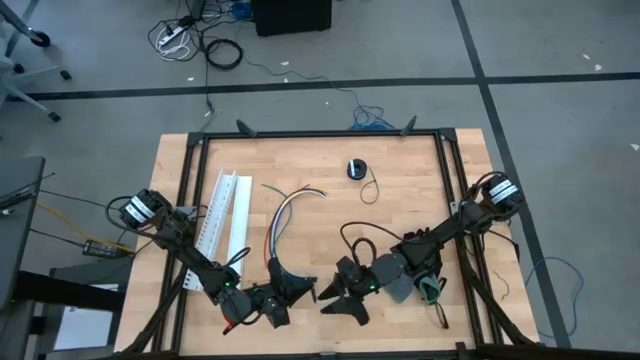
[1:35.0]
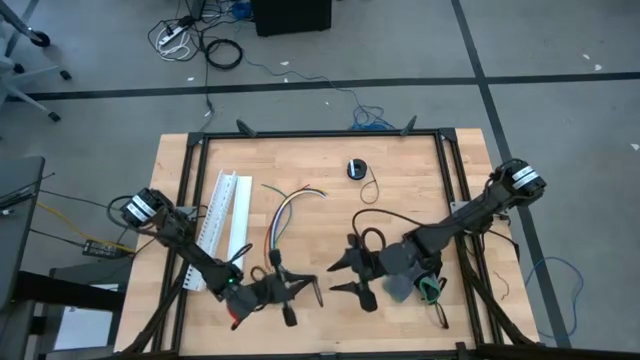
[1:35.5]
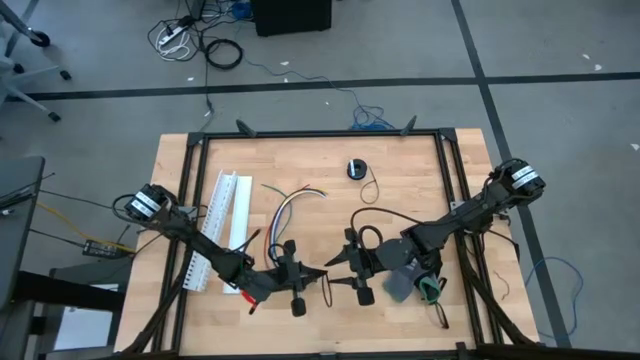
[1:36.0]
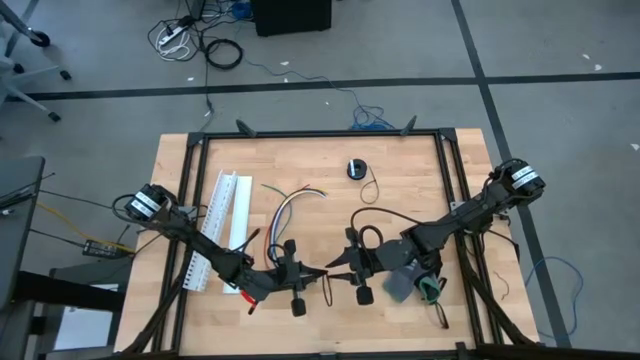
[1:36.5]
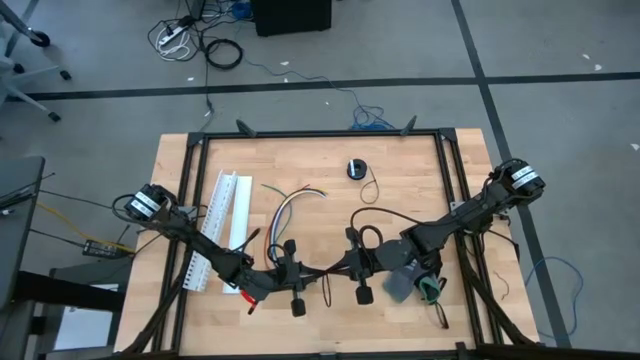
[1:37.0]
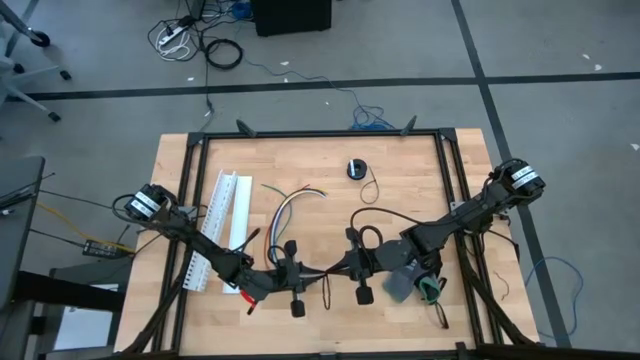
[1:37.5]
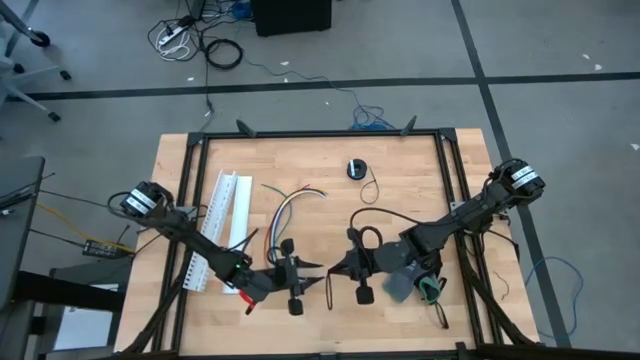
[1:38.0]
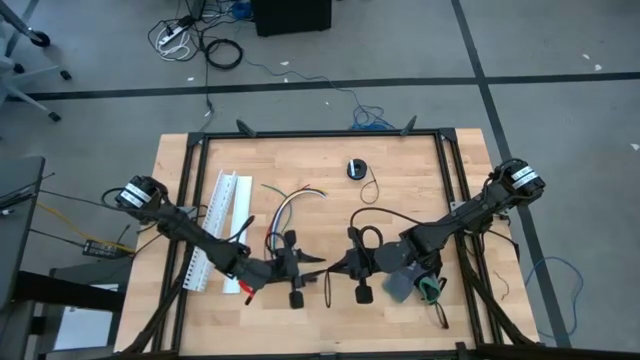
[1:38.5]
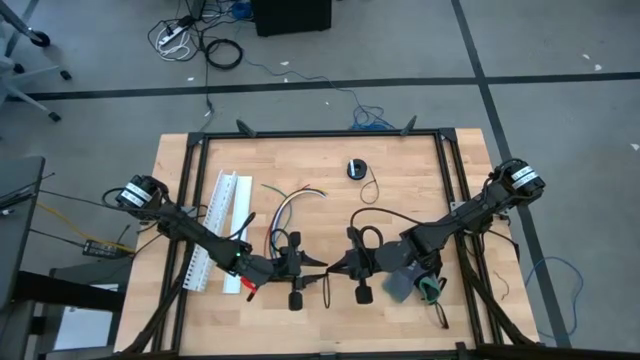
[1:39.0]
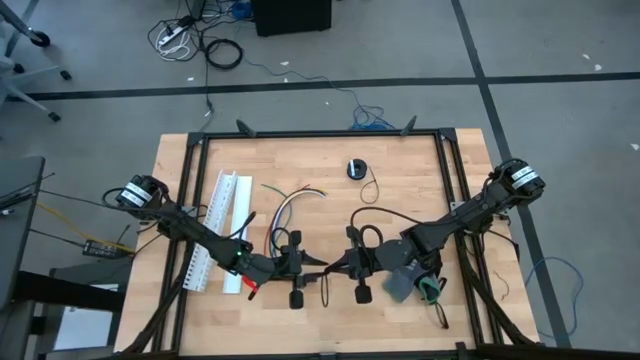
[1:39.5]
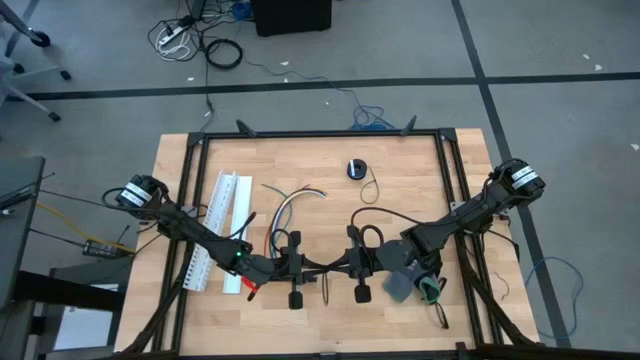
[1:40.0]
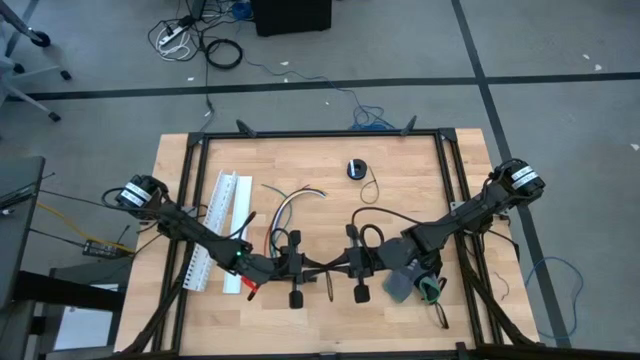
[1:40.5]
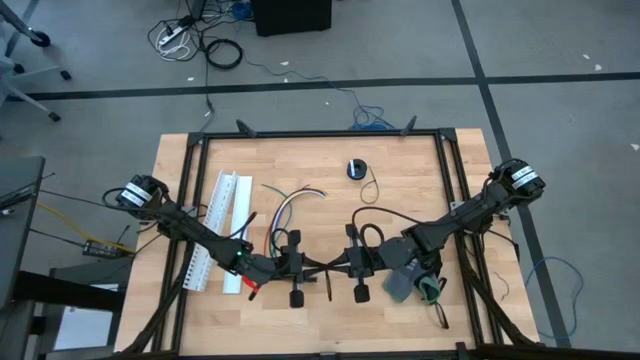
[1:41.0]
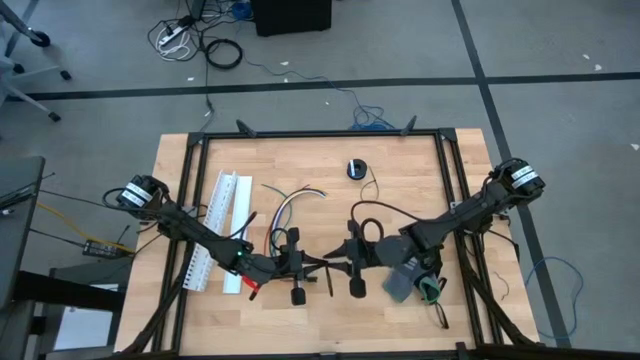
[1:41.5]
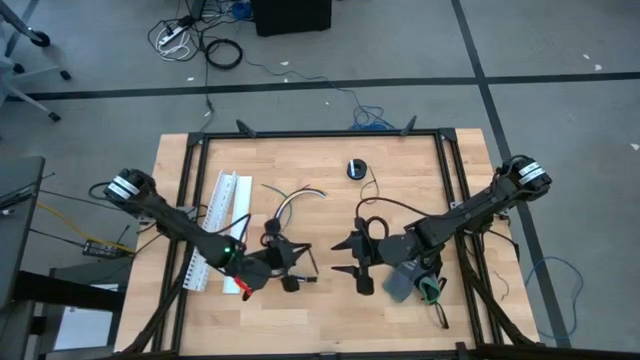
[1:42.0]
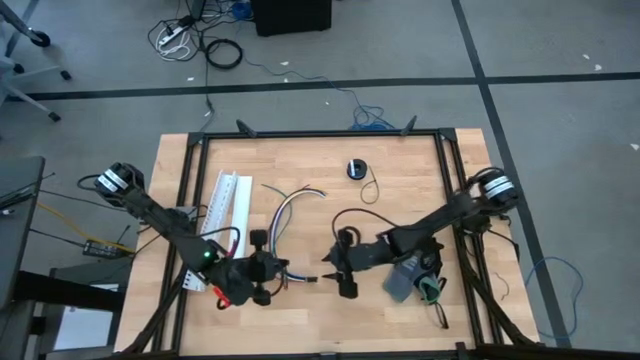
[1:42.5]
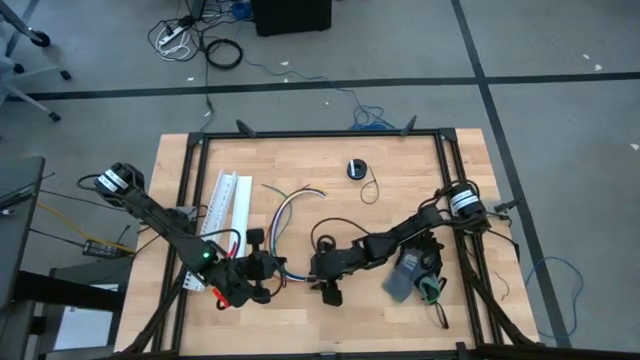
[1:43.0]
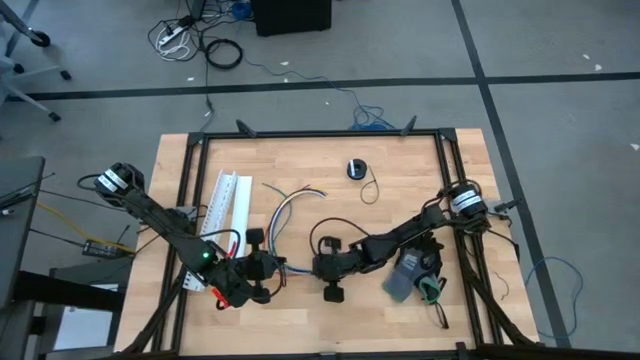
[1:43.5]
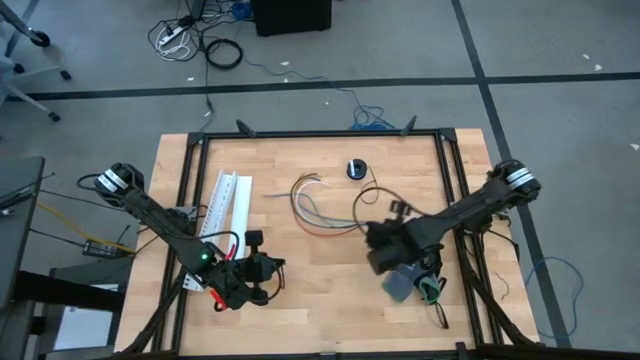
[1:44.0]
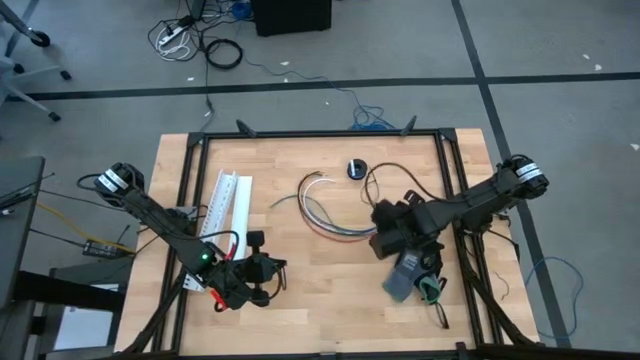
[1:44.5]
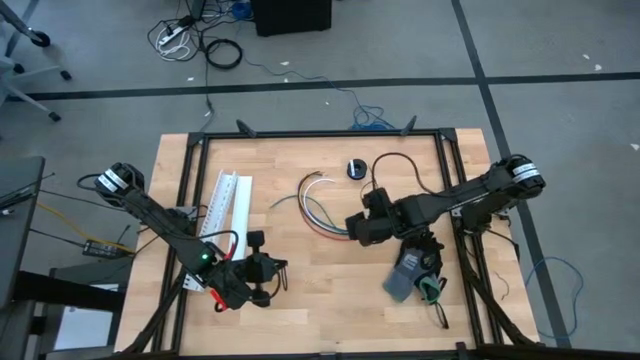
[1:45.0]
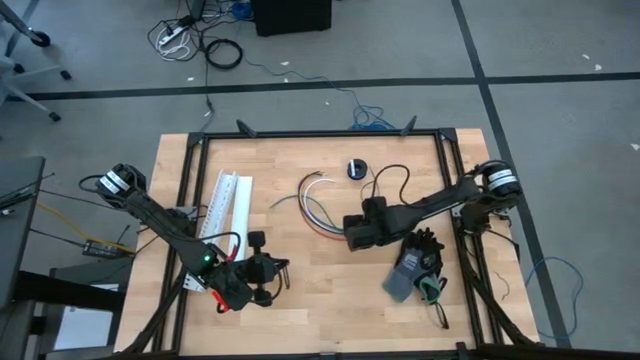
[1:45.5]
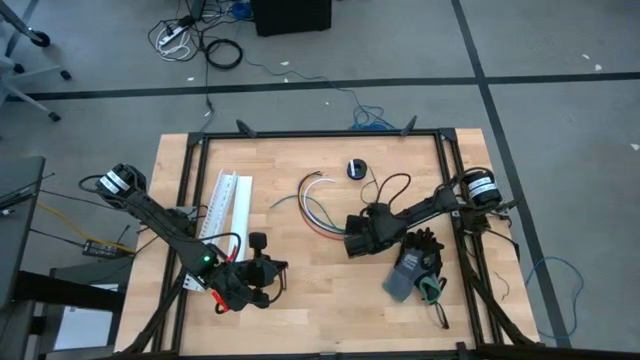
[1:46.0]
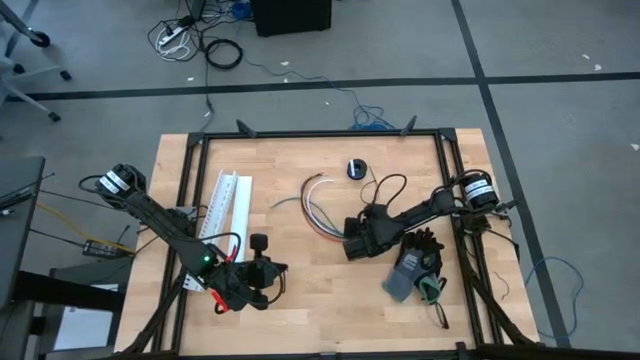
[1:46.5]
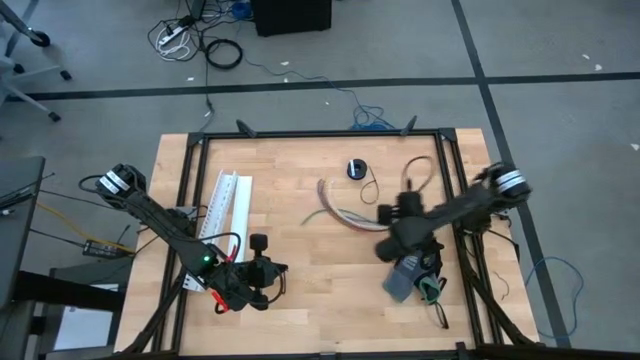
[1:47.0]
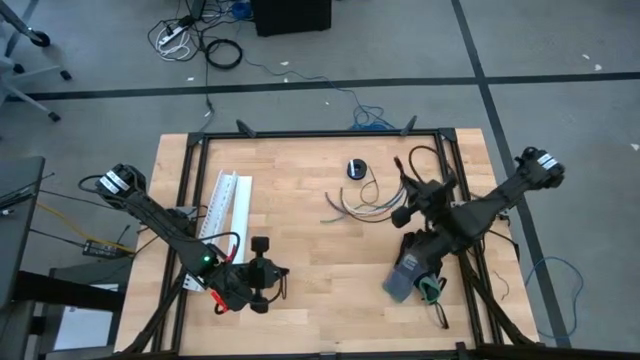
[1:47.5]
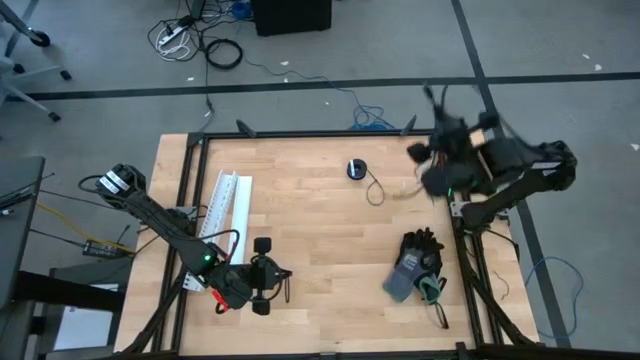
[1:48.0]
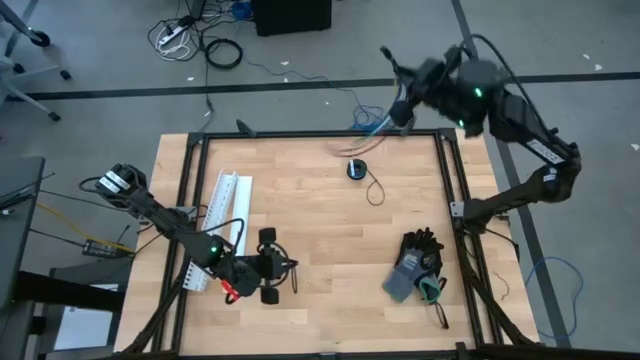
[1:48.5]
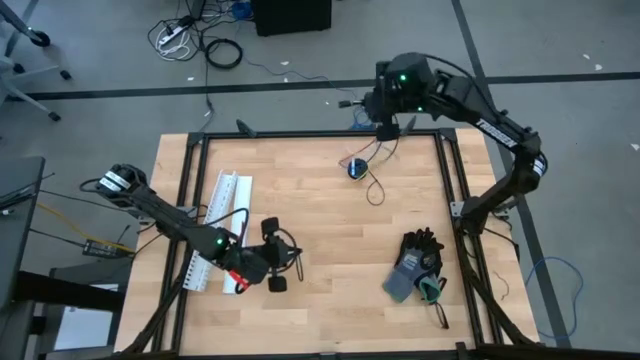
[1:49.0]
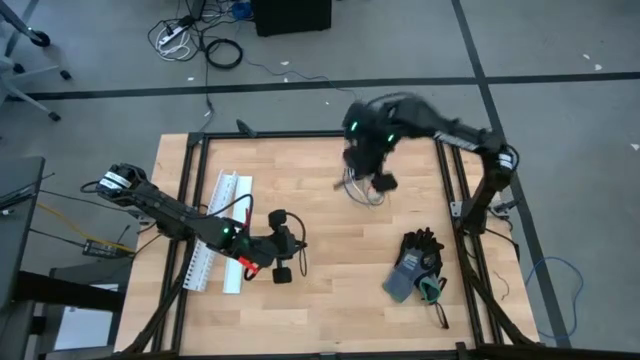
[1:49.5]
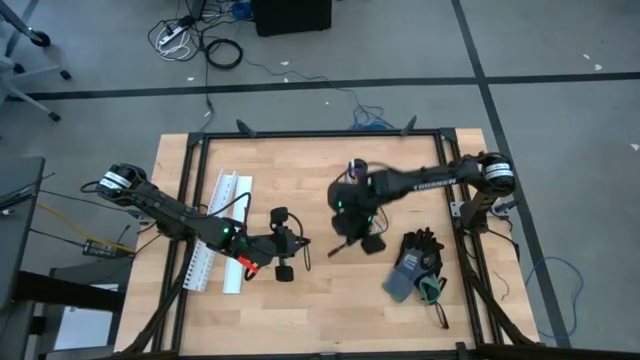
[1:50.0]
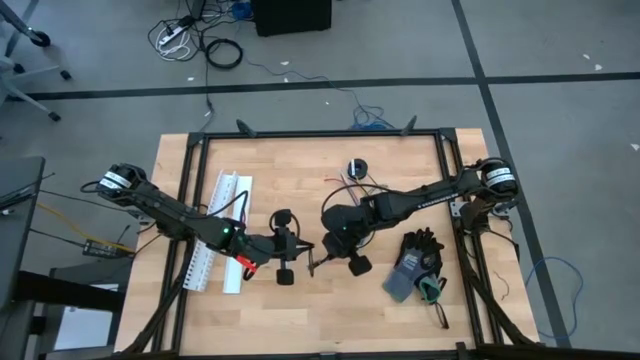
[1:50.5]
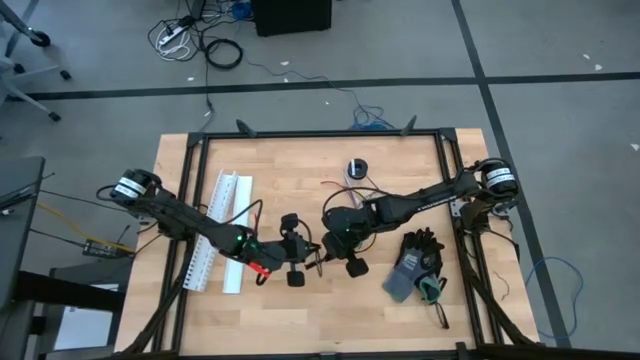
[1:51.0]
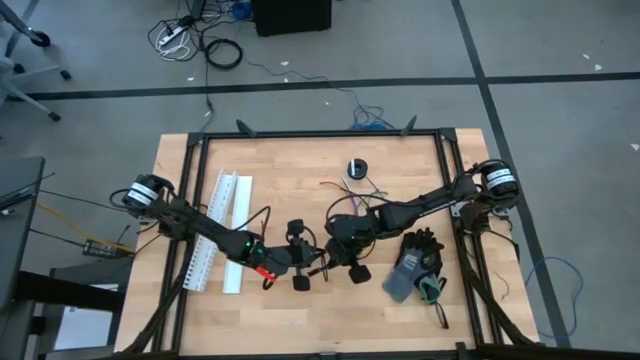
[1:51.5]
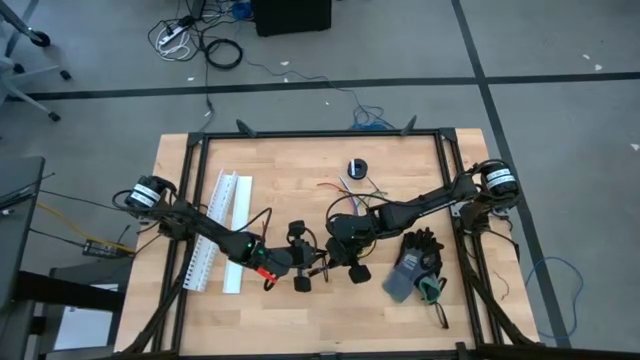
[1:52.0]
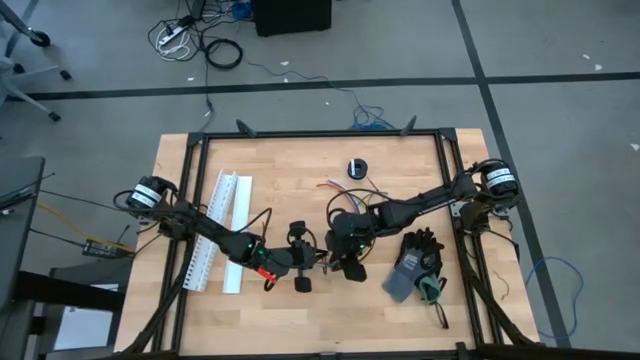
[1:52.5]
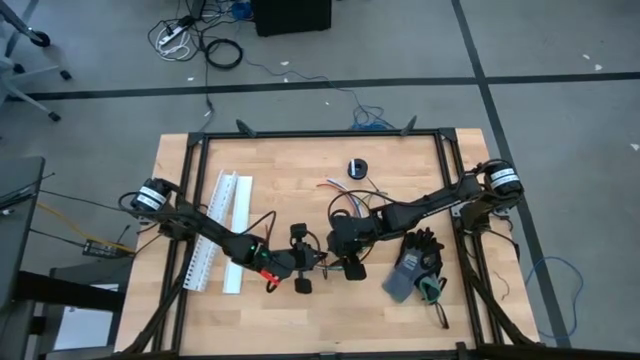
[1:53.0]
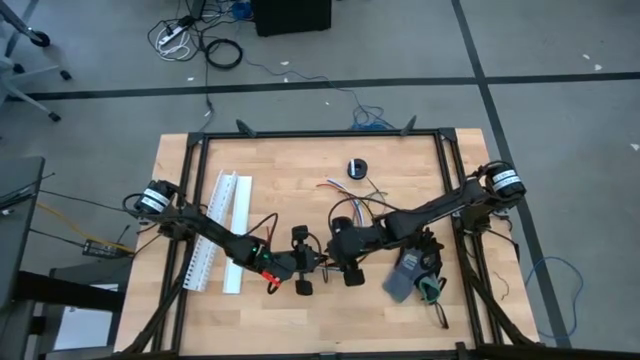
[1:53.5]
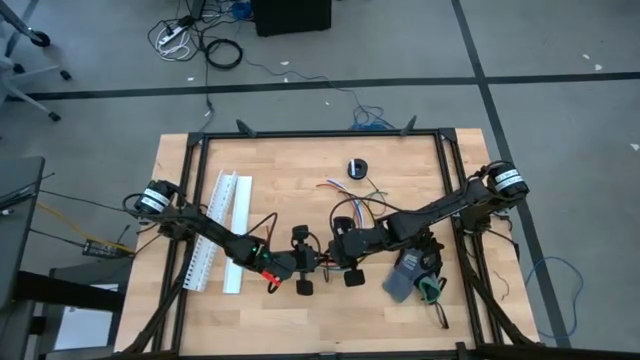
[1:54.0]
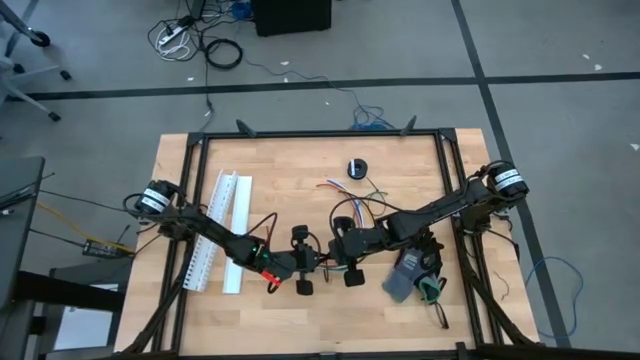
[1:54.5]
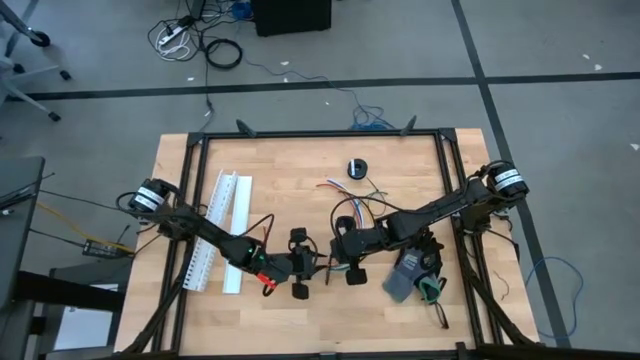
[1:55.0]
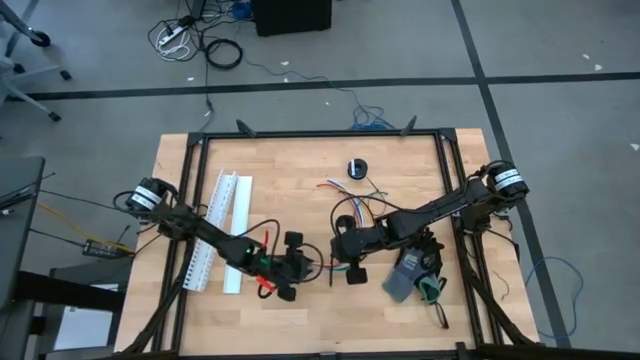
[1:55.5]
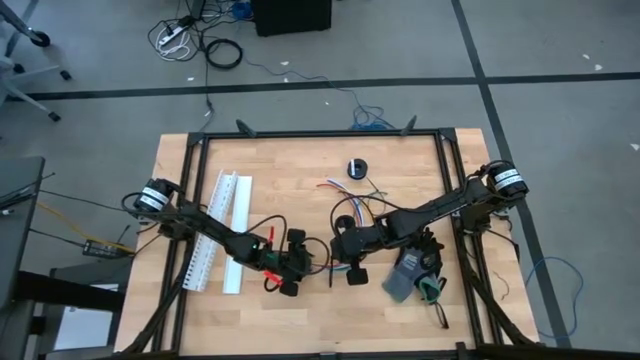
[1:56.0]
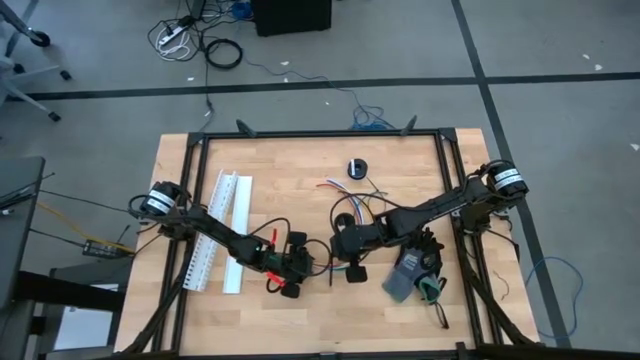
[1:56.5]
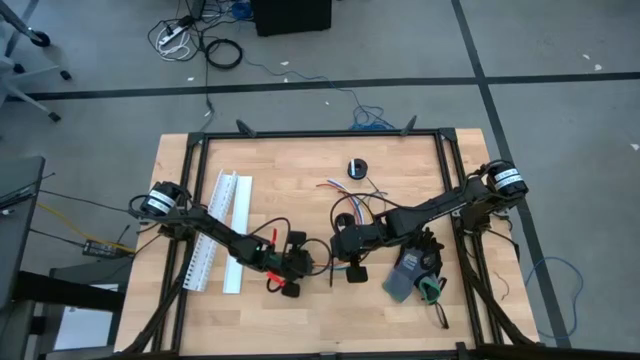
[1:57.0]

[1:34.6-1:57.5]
Task: Ziptie cables
Wrap the cables together using a ziptie
